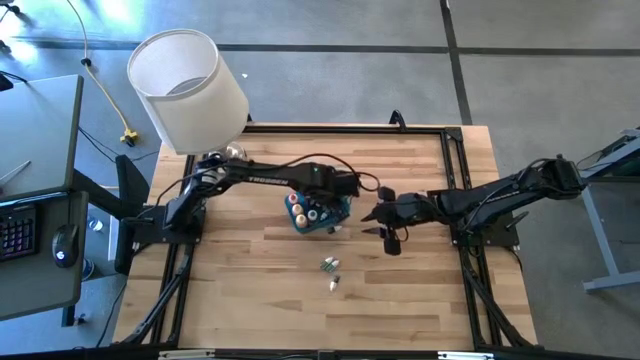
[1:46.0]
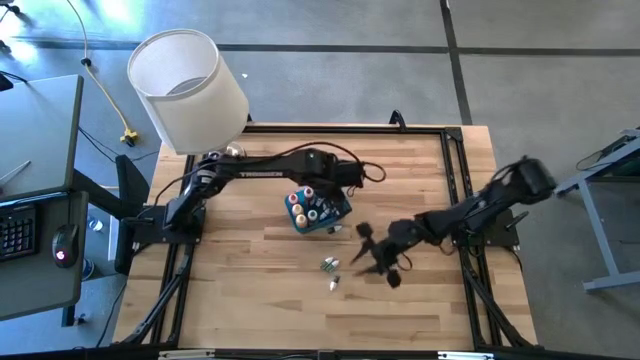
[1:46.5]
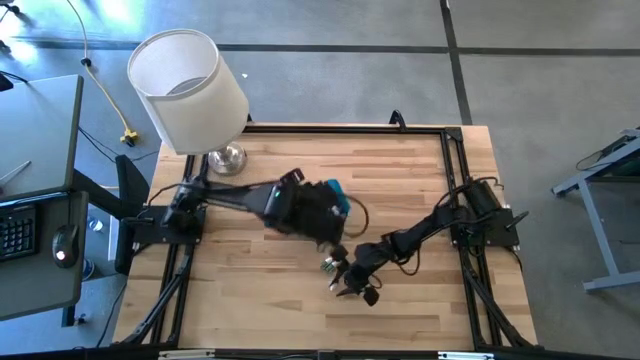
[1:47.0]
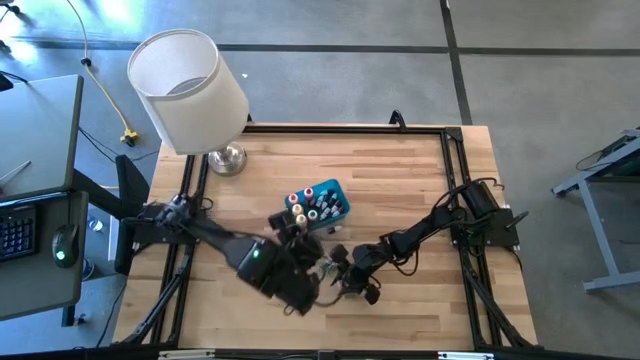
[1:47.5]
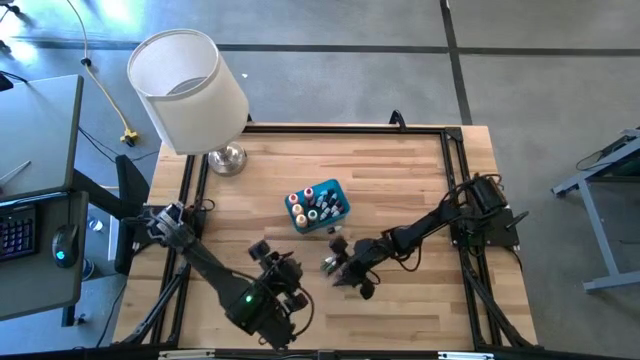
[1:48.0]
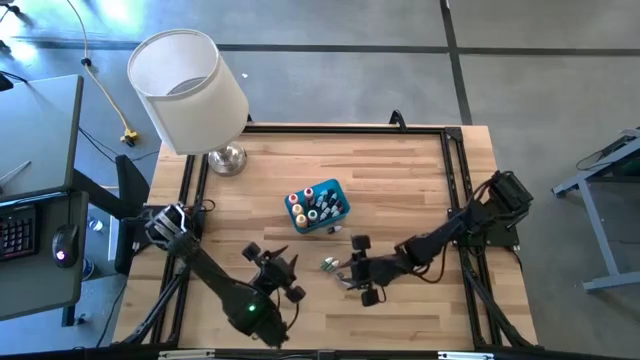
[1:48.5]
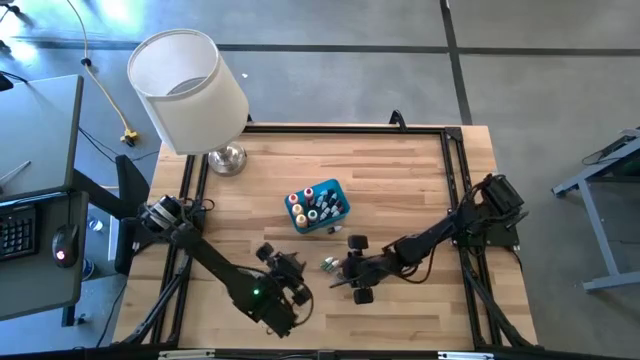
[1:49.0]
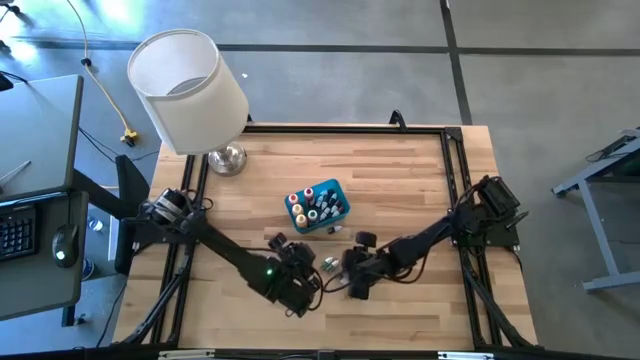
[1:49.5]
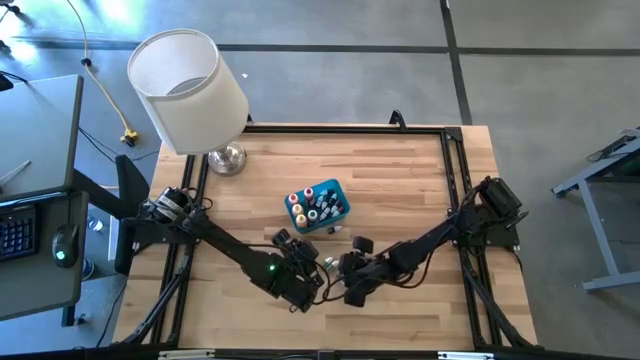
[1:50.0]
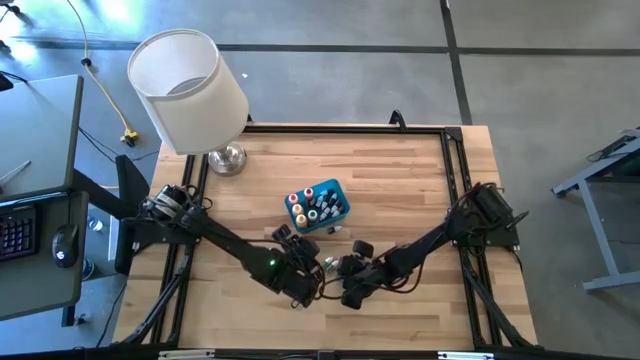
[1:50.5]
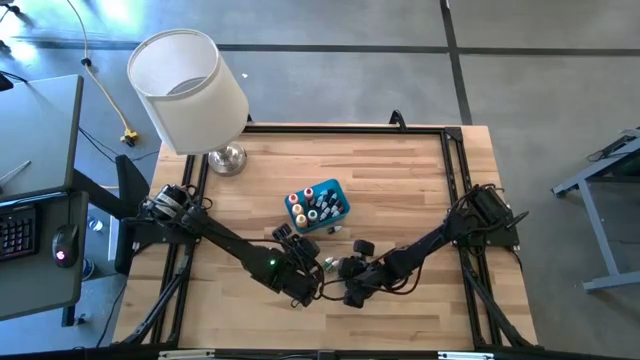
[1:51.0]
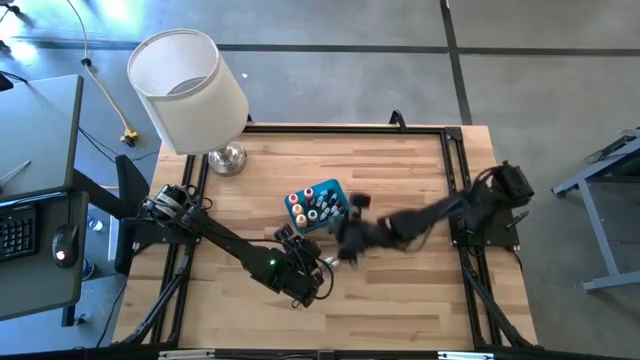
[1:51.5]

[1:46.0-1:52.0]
Task: Pick & Place food coloring
Put the bottom small green food coloring bottle into the bin

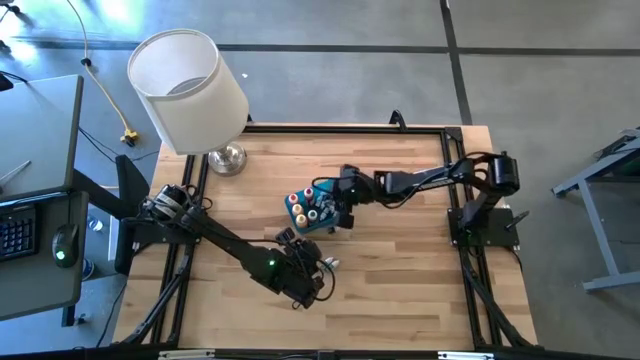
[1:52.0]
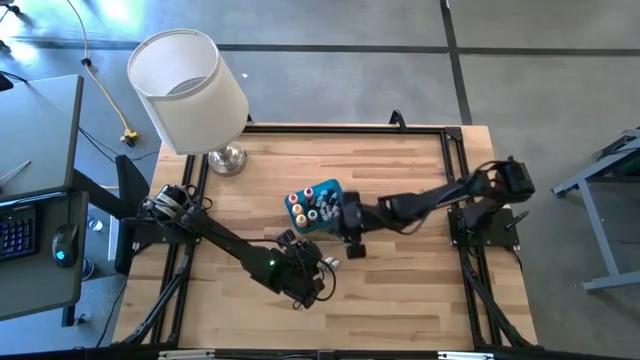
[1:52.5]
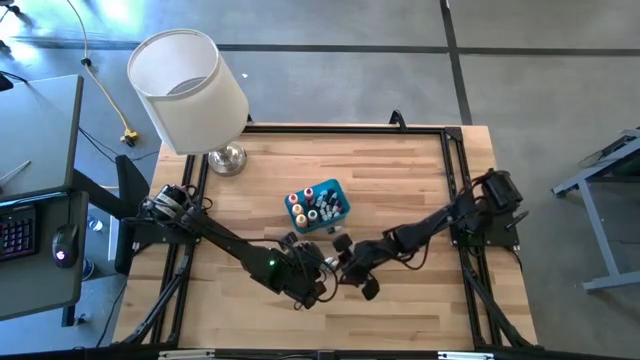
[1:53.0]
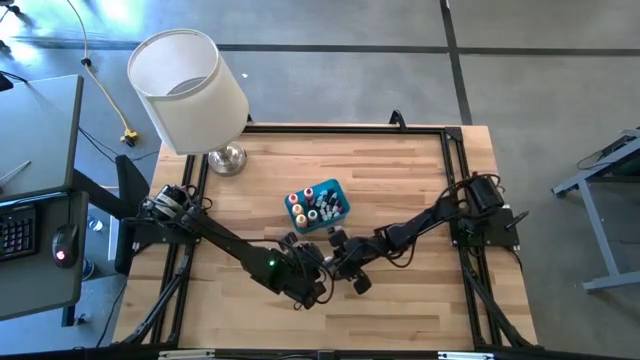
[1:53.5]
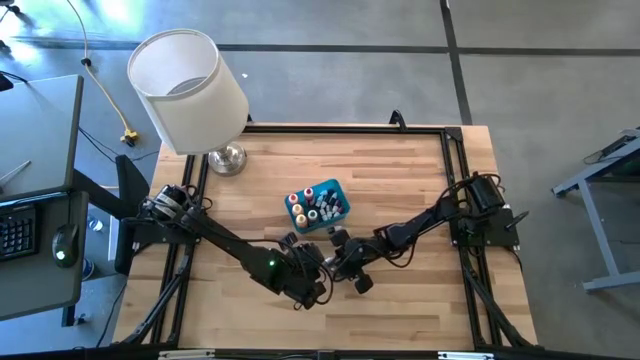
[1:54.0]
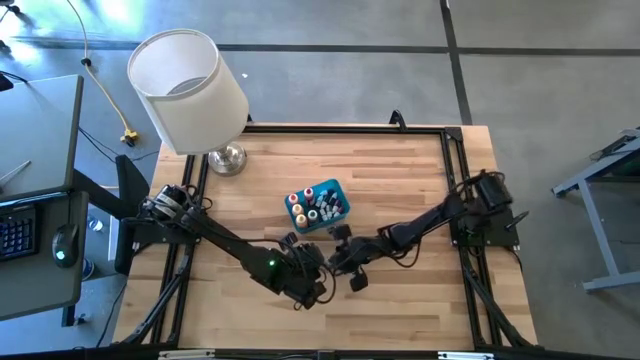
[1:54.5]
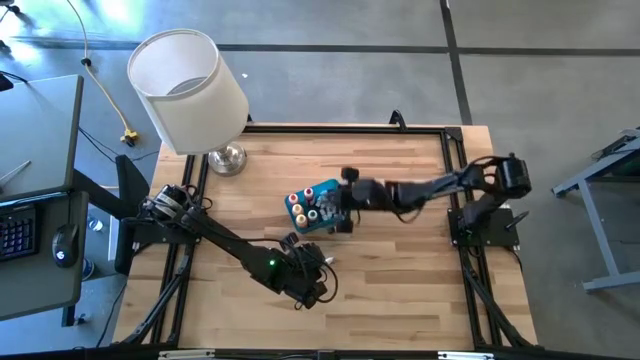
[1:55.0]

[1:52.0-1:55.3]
Put the bottom small green food coloring bottle into the bin

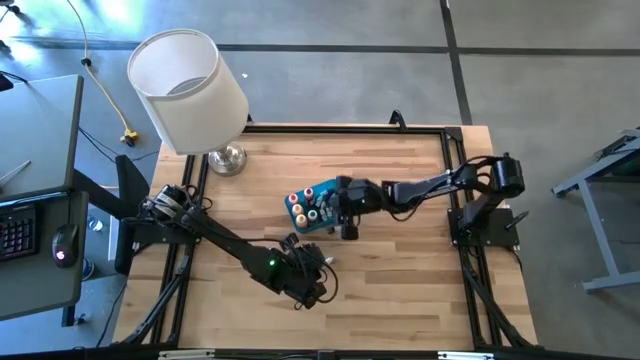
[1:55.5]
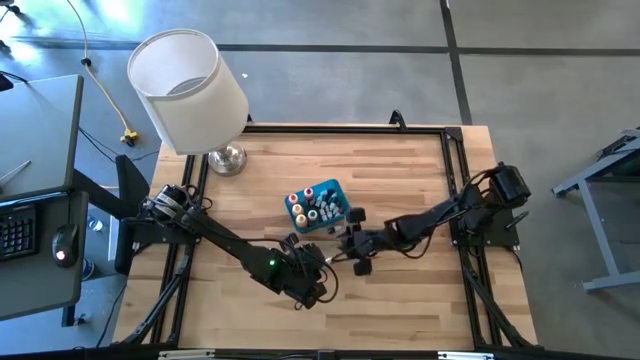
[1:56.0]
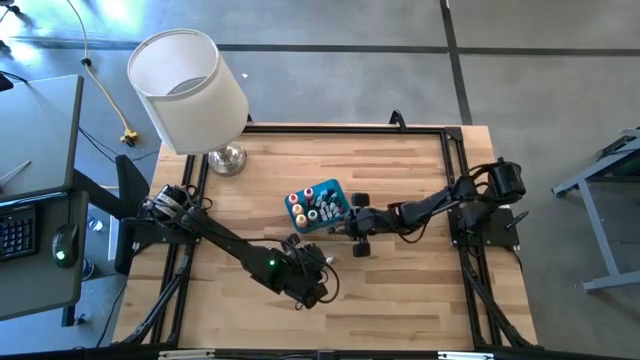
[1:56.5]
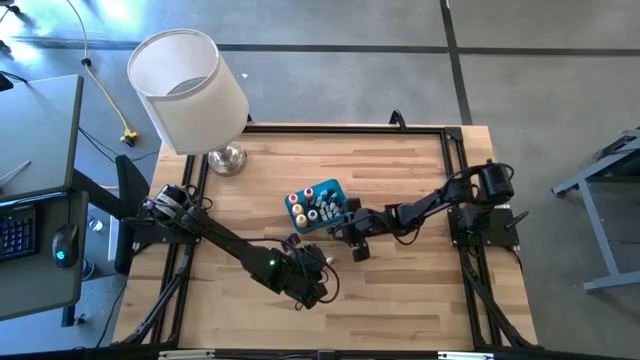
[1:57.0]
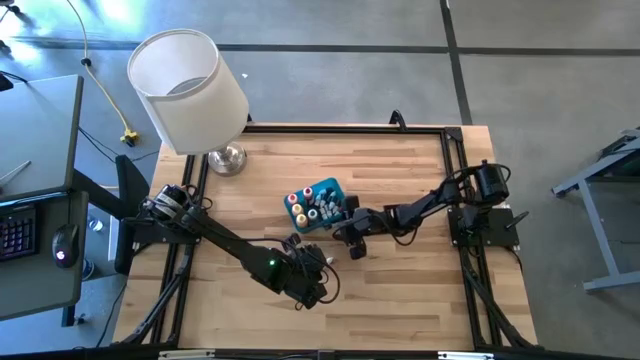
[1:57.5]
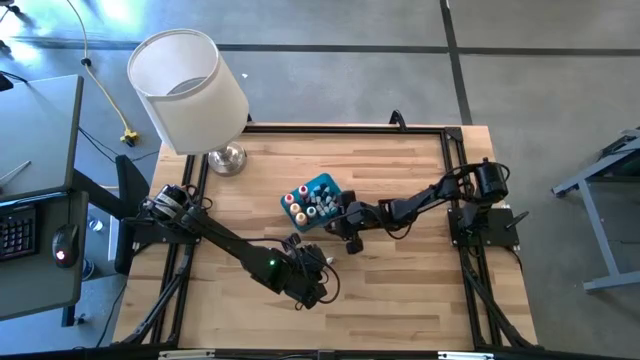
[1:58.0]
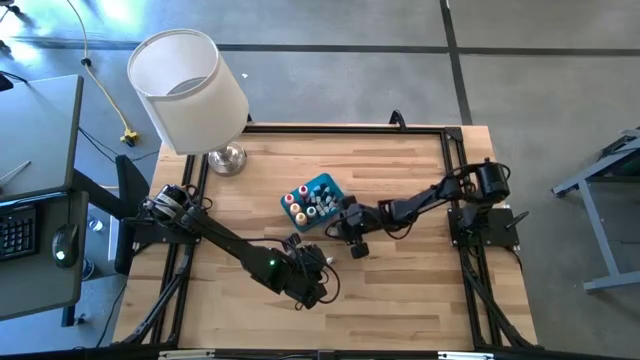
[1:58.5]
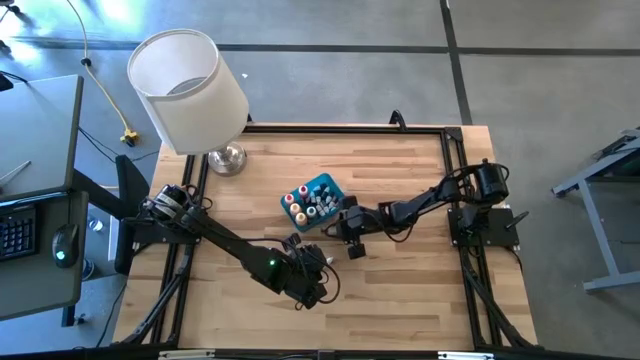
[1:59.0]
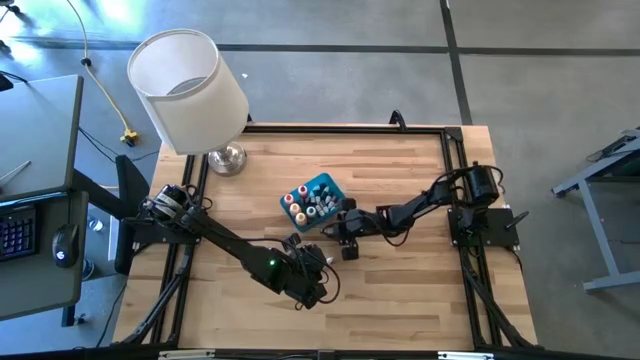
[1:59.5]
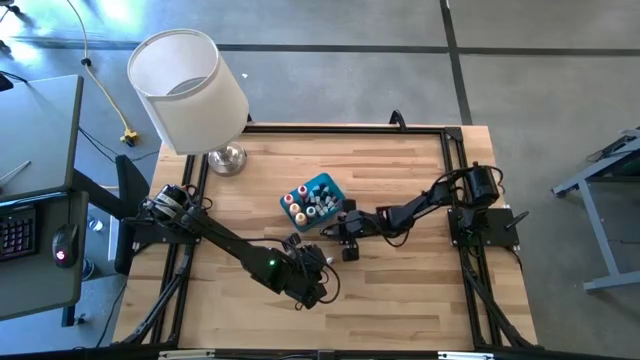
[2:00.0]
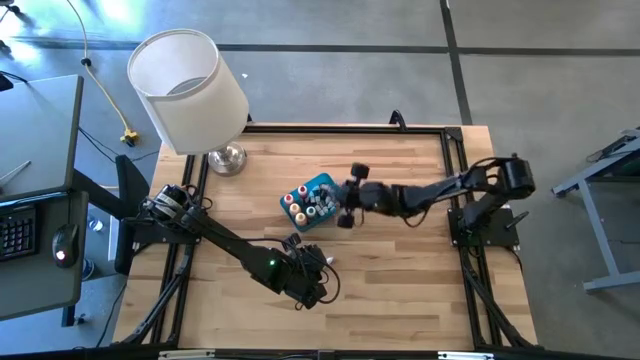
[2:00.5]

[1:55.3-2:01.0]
Put the small red food coloring bottle into the bin

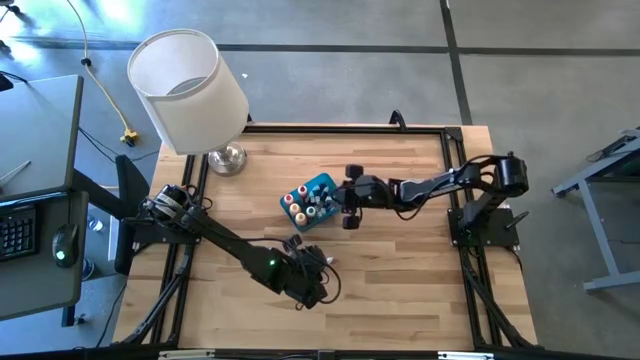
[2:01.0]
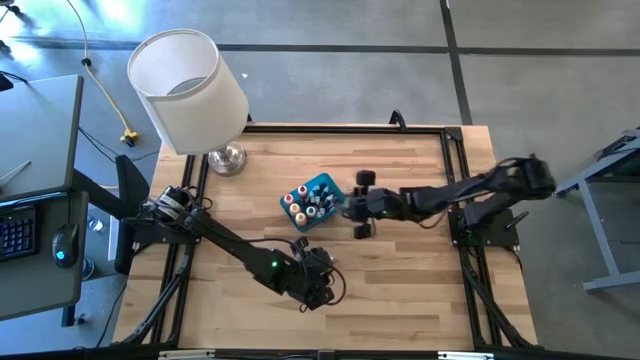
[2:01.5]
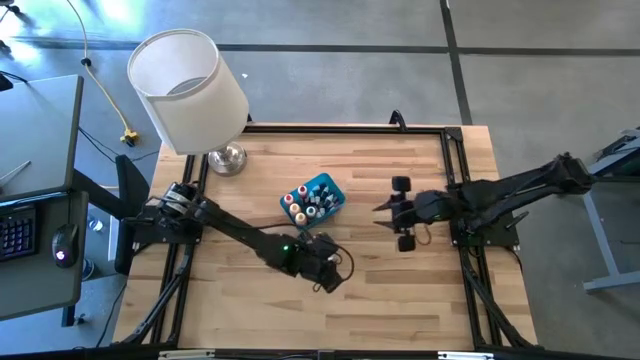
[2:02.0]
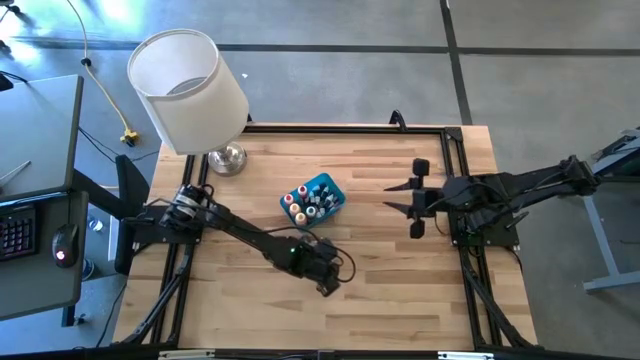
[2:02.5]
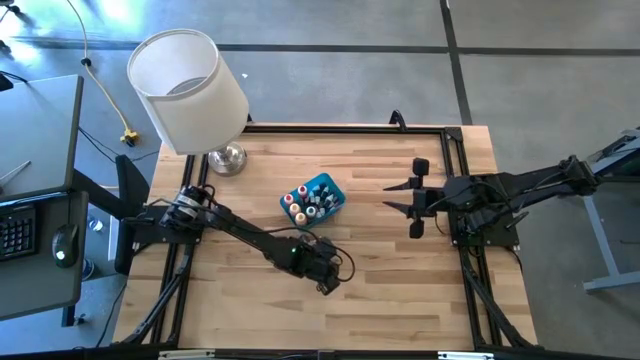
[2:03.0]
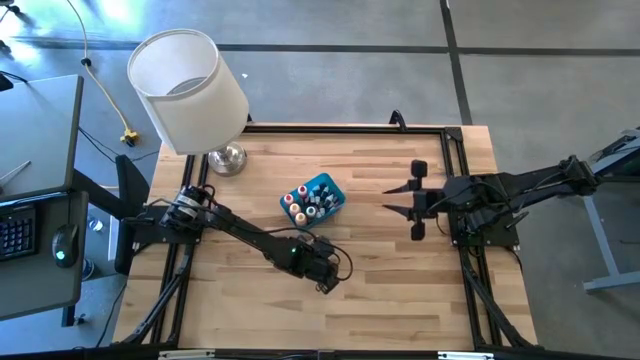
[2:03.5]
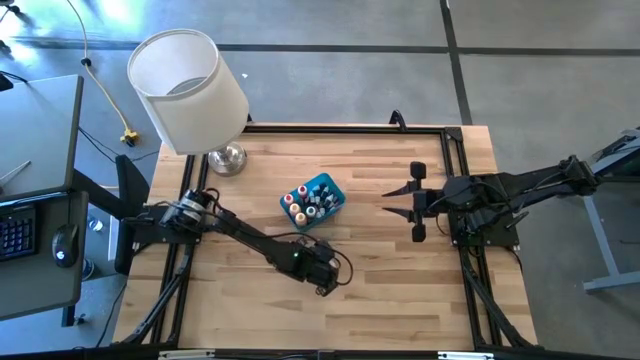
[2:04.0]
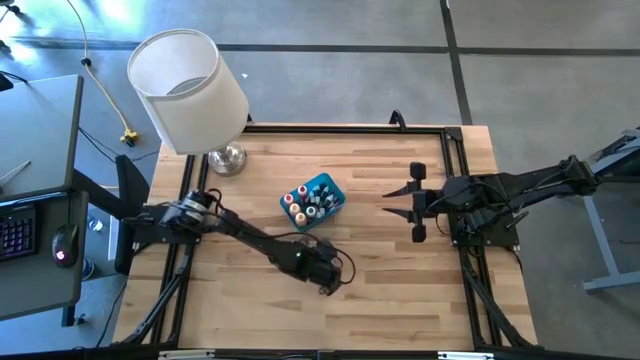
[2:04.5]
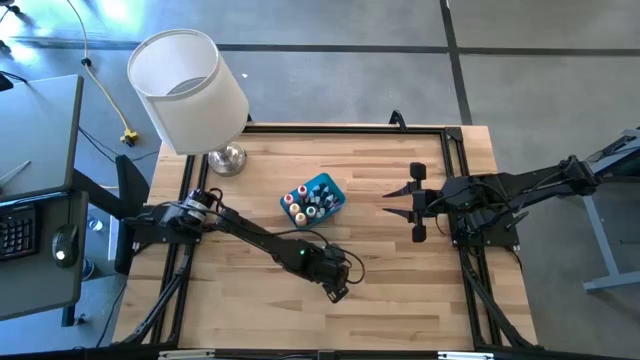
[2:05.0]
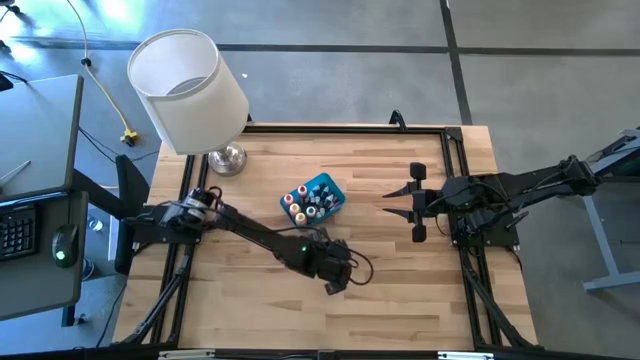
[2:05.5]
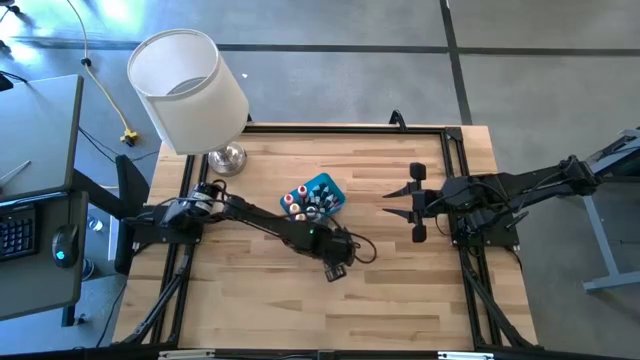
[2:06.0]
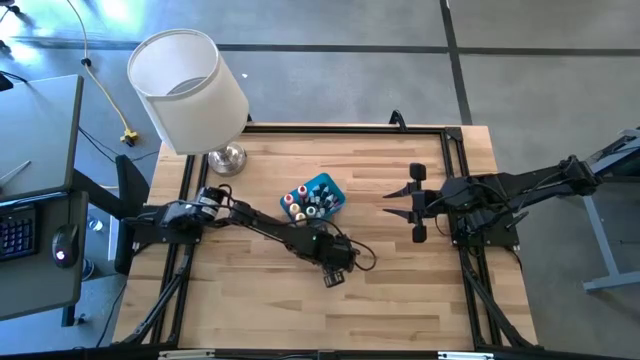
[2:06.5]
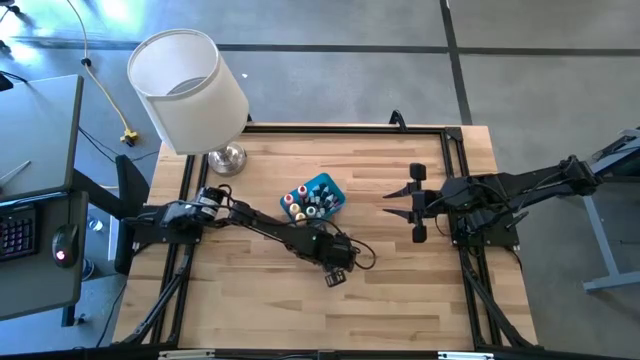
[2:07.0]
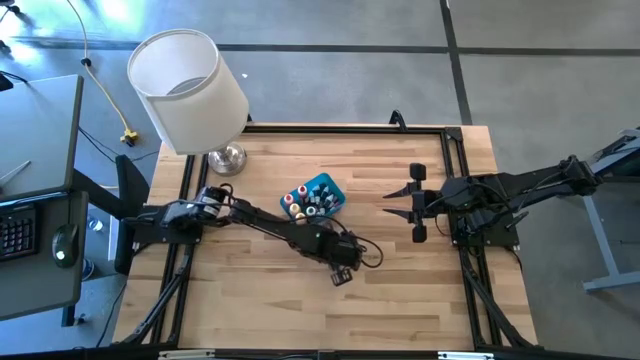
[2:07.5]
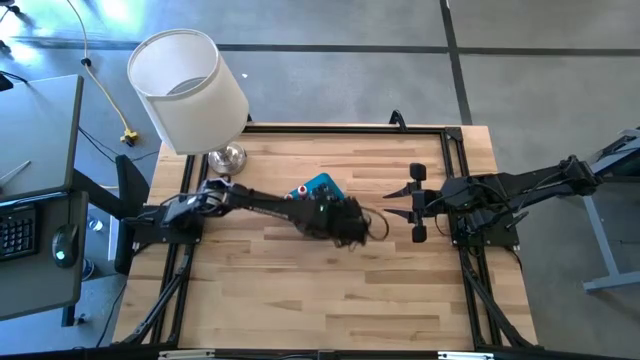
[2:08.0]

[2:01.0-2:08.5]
Put the small green food coloring bottle into the bin
